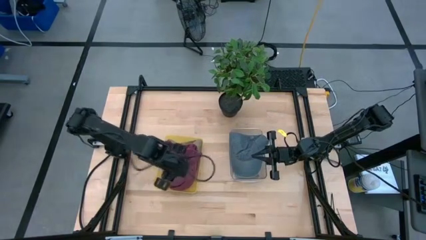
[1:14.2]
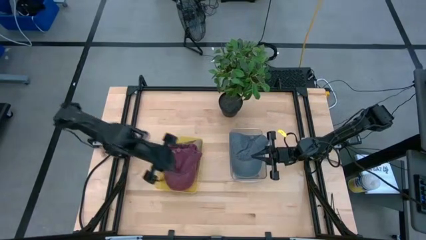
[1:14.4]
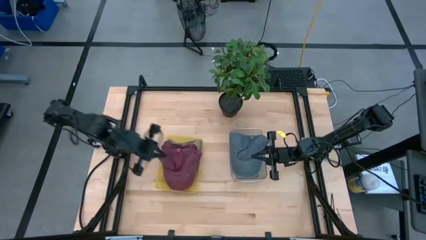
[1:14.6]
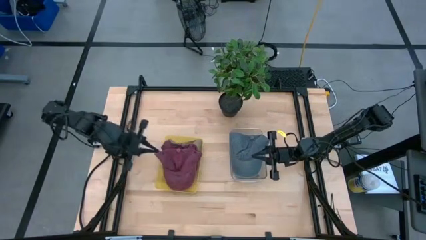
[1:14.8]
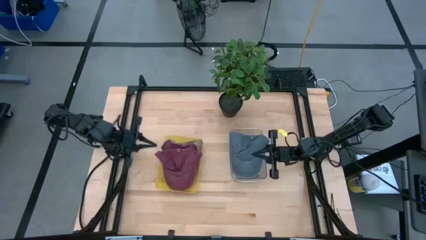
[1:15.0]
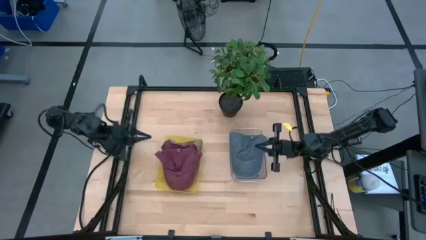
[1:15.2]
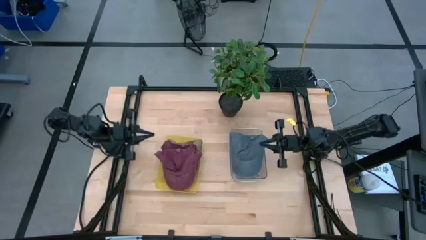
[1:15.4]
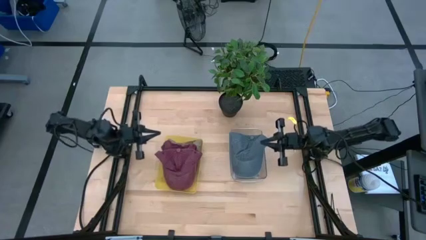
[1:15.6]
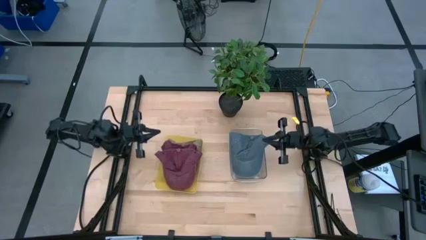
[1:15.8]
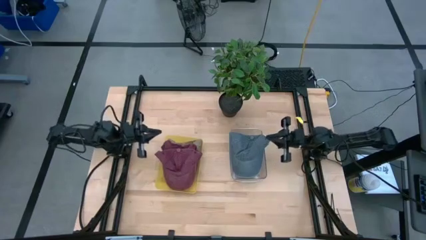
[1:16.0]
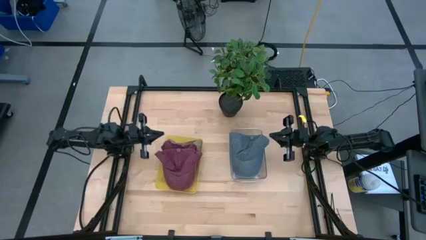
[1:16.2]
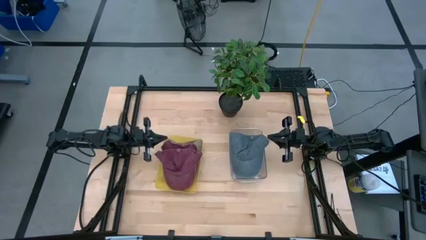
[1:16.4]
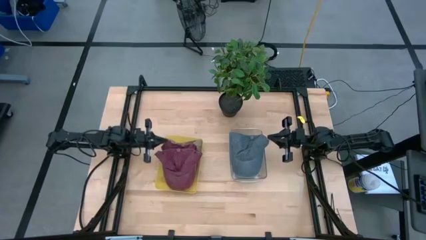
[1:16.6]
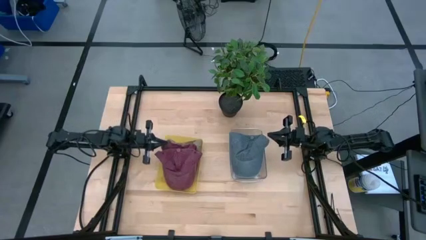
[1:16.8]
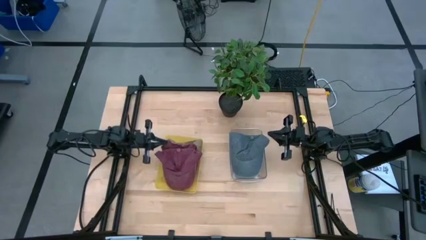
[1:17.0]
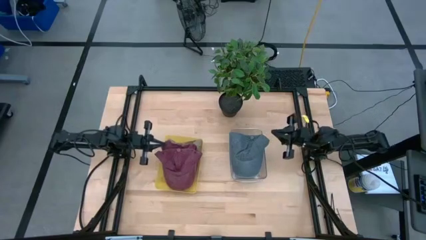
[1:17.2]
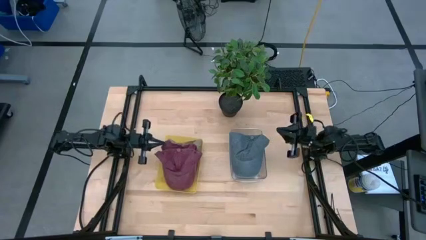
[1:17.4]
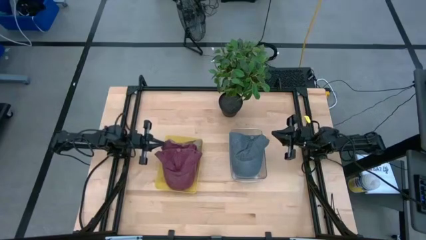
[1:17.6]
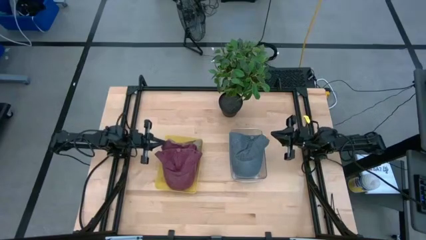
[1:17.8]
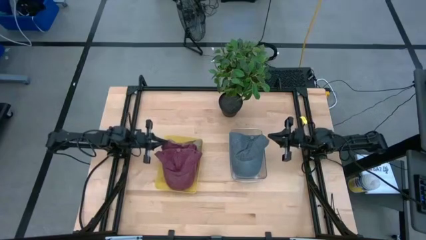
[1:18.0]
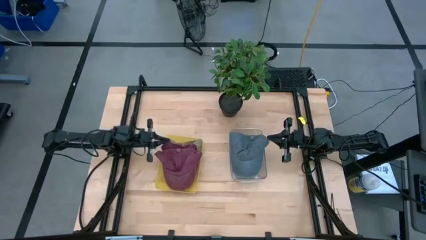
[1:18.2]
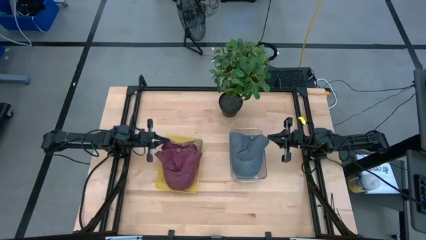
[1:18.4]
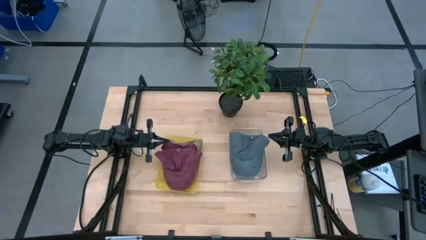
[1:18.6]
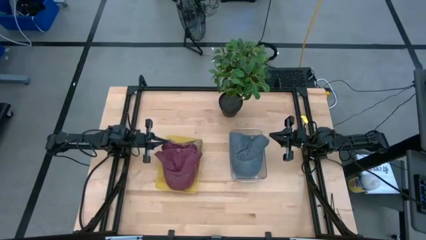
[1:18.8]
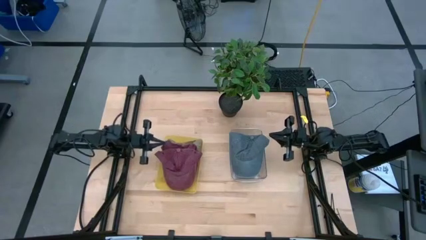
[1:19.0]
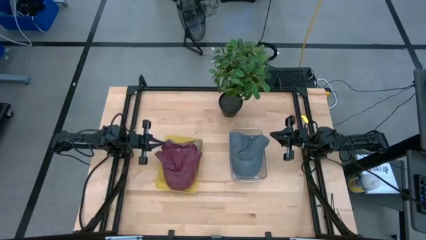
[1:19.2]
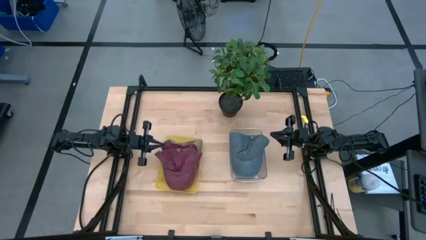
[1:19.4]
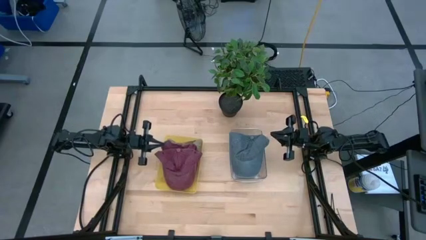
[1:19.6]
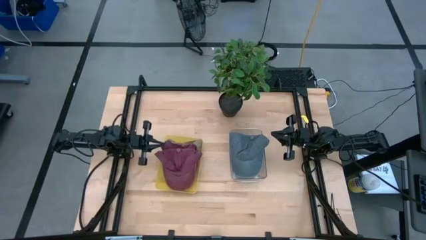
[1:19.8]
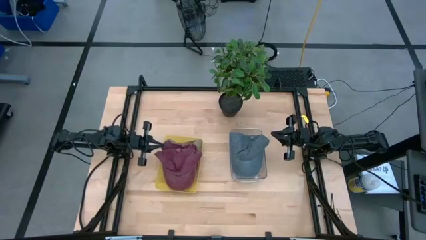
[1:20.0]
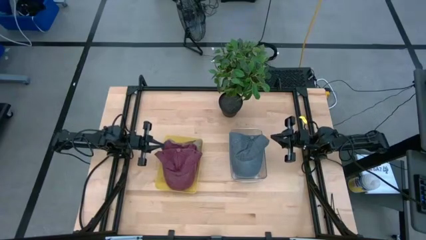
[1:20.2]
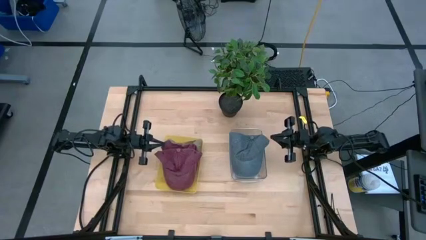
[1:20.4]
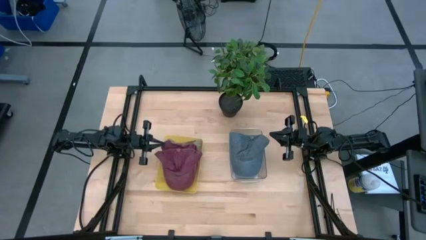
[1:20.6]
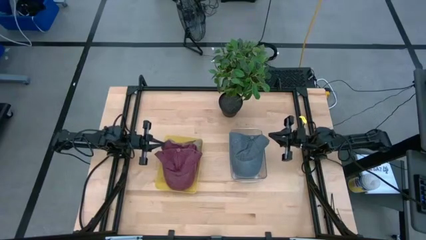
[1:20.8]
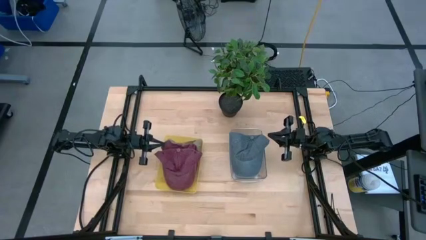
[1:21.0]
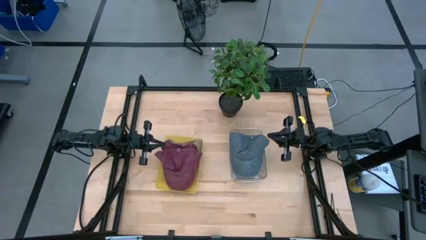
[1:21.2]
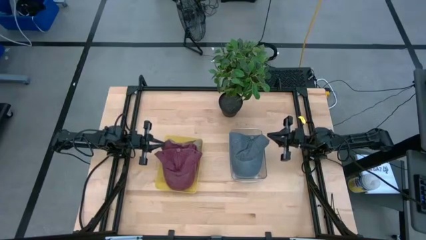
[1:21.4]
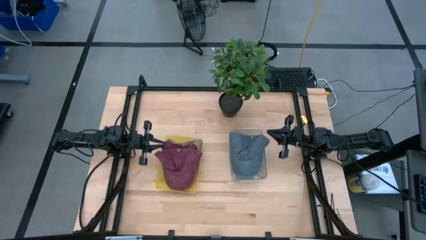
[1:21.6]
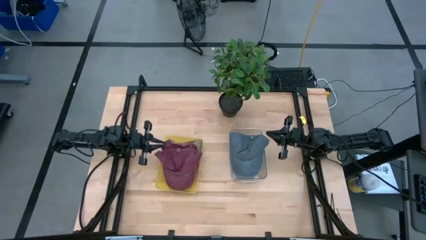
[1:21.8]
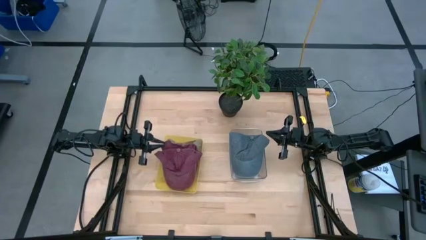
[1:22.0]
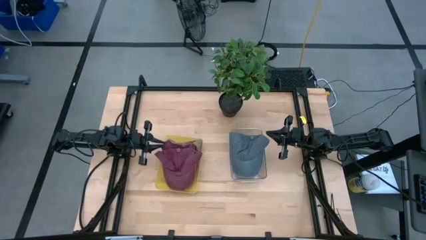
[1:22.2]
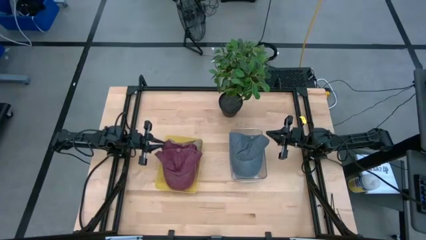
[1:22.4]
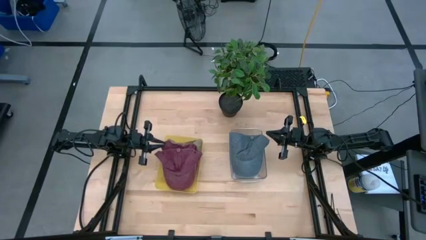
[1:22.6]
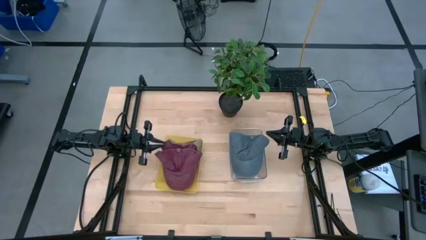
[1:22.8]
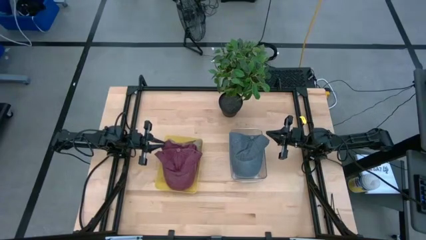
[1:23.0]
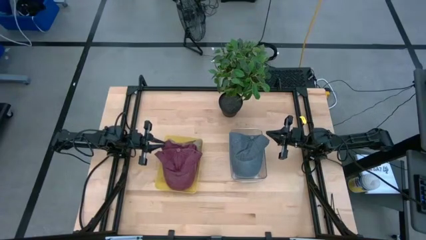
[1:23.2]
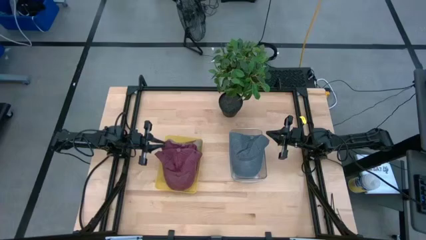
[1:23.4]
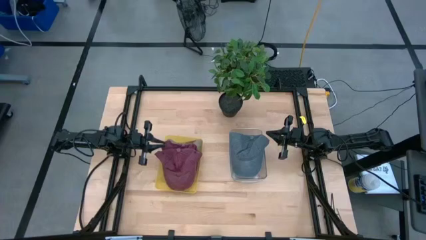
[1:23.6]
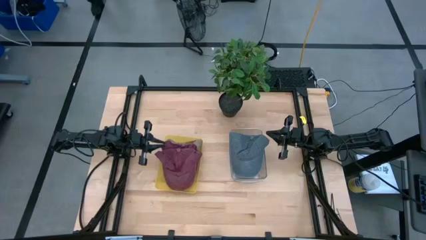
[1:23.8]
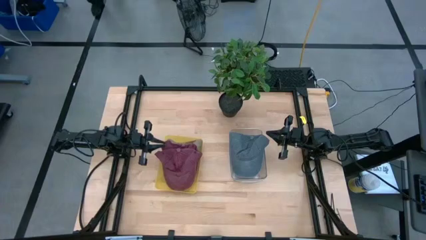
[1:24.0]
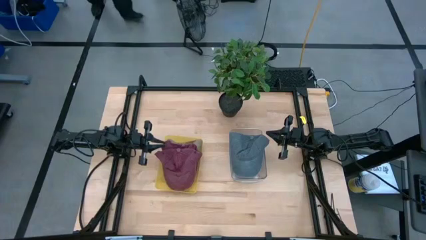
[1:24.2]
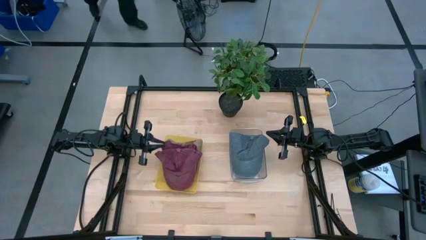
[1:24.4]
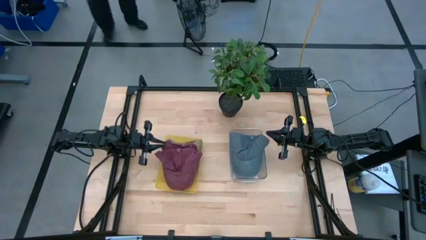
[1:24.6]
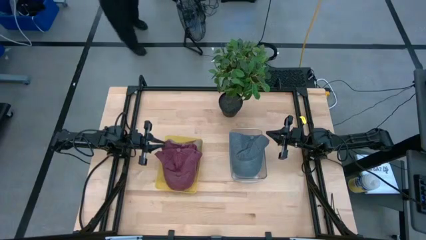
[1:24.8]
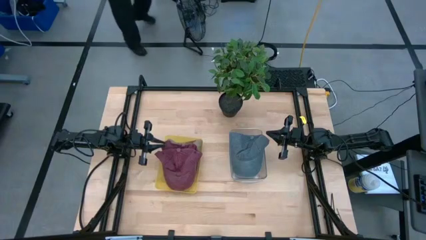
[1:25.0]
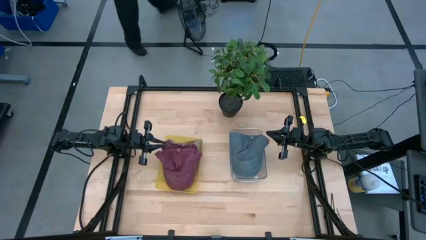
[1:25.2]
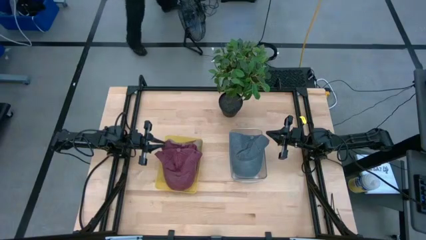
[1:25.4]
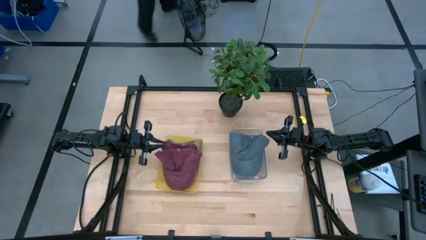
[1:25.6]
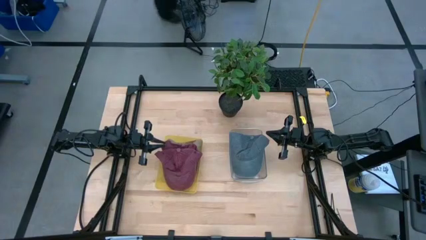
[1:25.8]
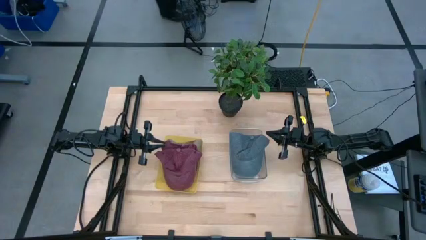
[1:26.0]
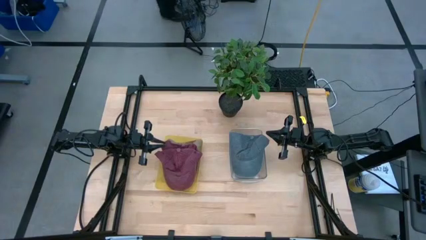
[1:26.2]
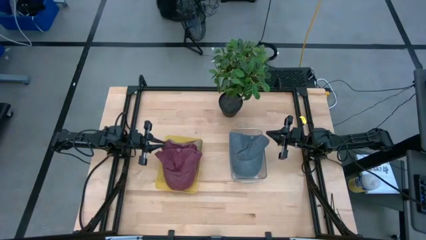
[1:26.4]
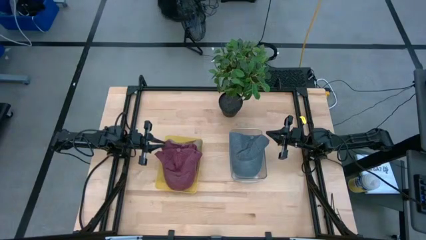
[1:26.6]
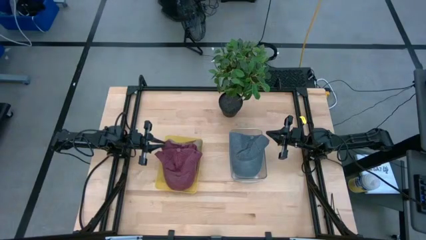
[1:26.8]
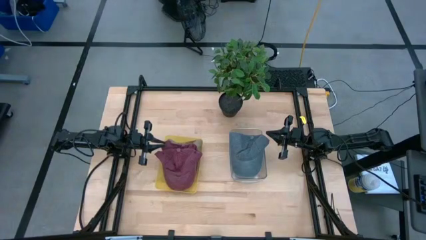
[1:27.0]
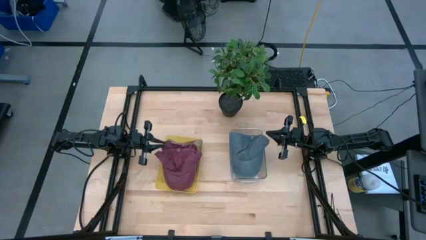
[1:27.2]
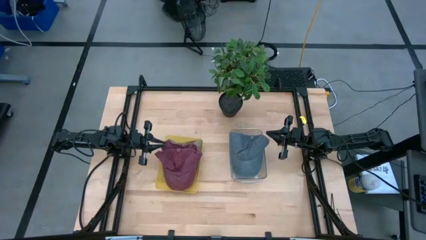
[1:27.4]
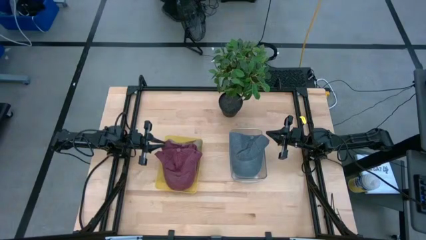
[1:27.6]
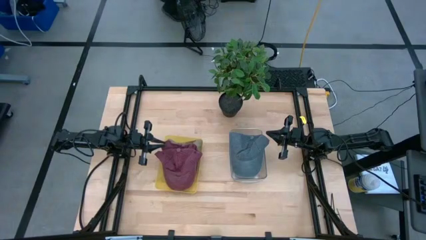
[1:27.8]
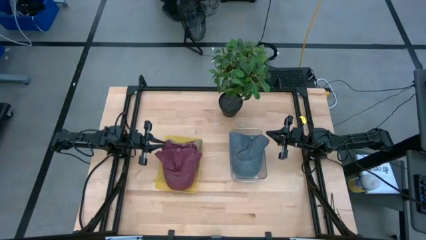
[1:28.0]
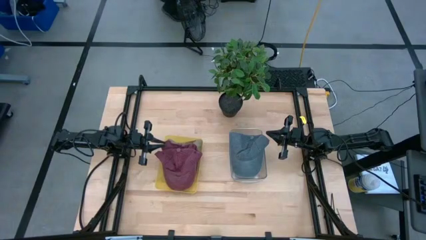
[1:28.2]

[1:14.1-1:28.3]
Task: Pick & Place hat
Return to Home Position

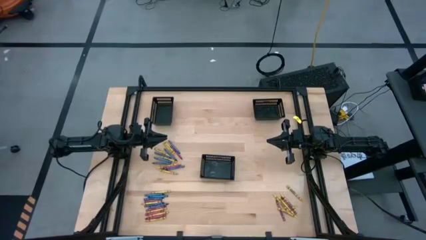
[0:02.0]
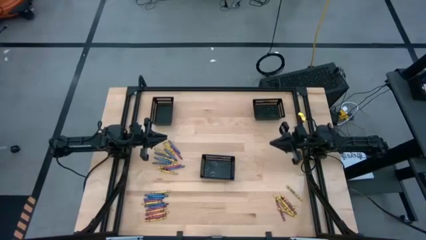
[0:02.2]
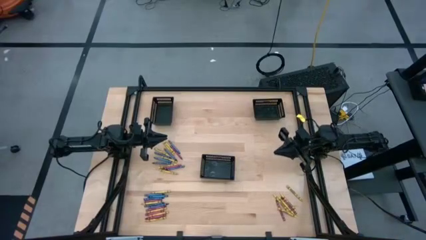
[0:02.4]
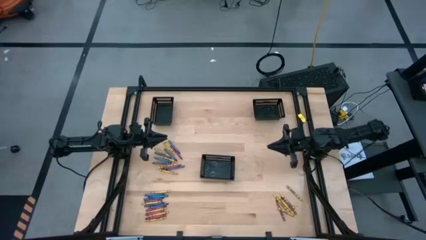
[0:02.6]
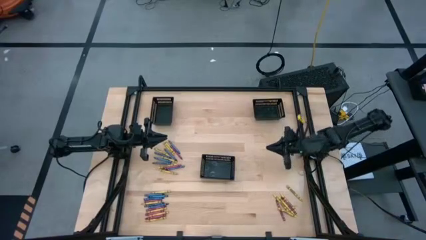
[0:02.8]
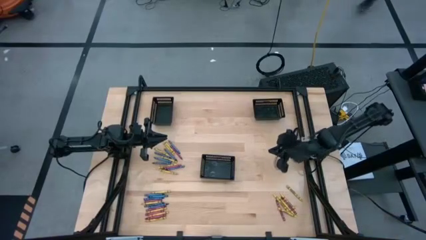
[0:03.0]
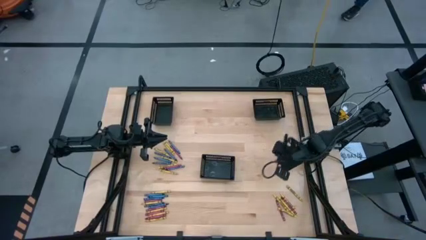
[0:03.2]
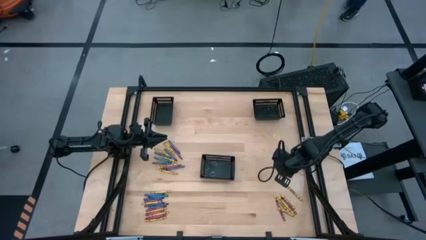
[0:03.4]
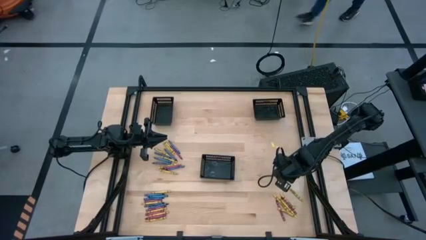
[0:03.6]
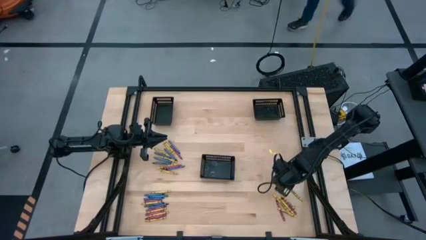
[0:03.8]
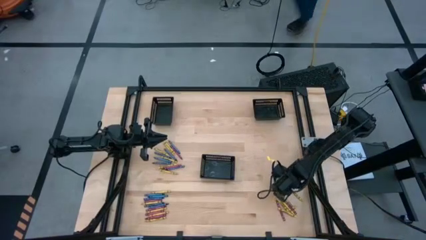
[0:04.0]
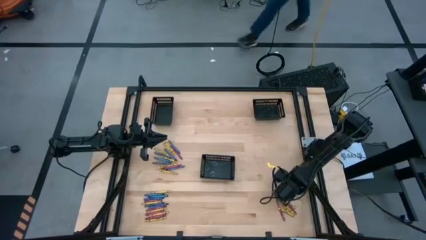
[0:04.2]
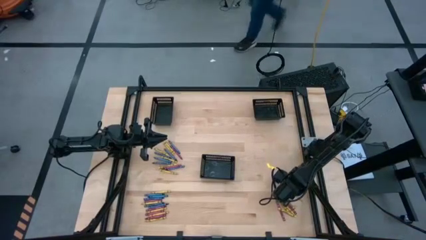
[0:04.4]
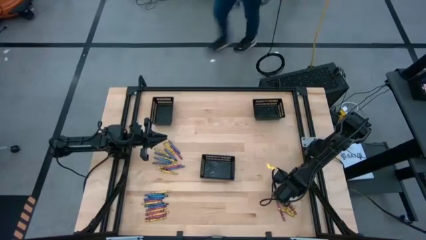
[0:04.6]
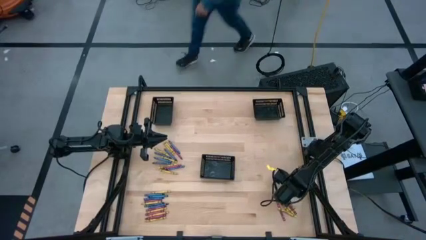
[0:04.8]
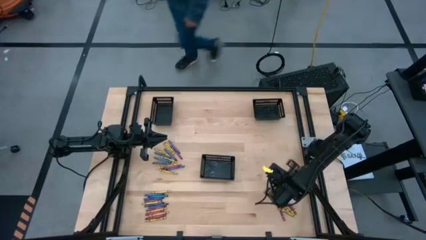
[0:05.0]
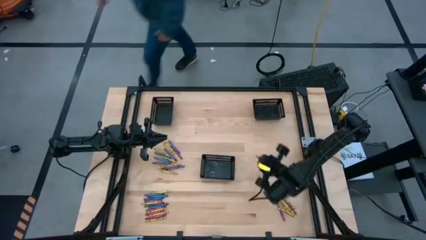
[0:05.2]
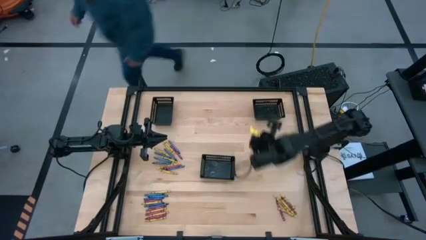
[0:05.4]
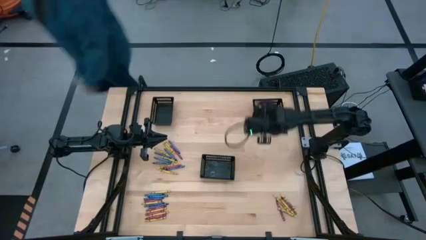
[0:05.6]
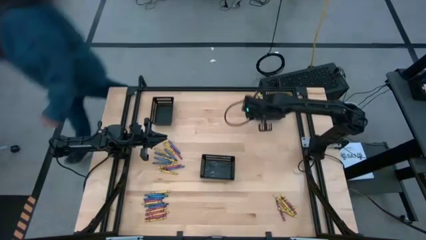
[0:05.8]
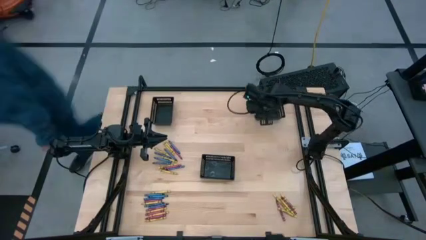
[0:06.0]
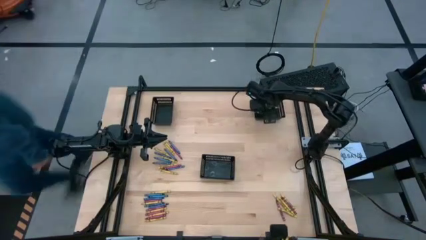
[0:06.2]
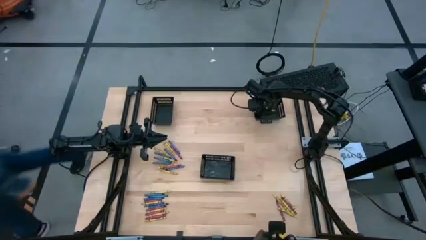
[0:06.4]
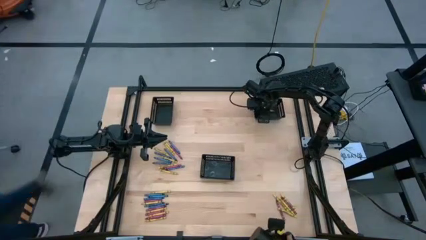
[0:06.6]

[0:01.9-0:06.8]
Task: Sort crayons
Put the yellow crayon into the top right black bin
